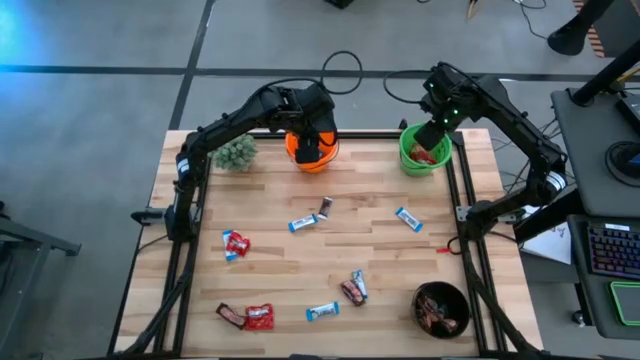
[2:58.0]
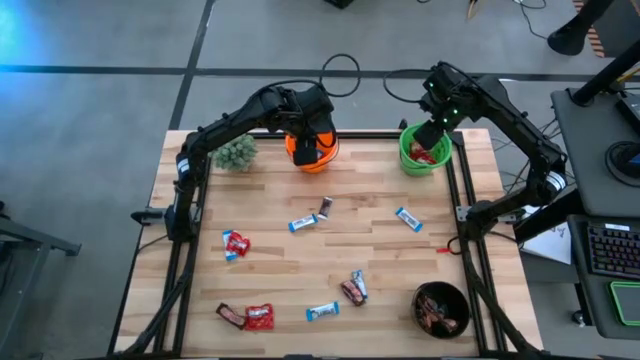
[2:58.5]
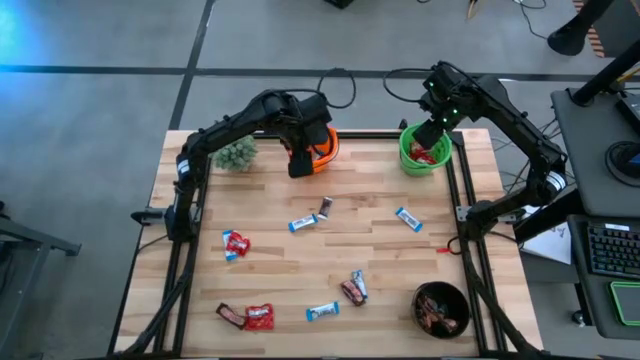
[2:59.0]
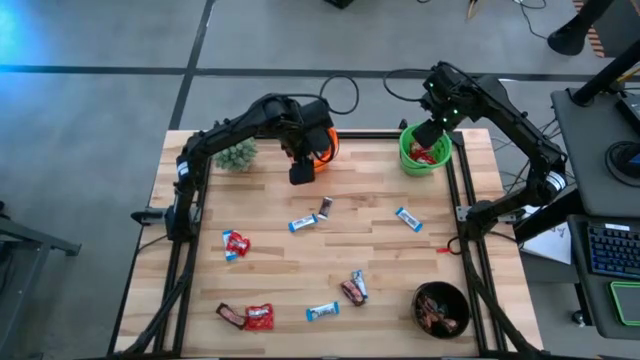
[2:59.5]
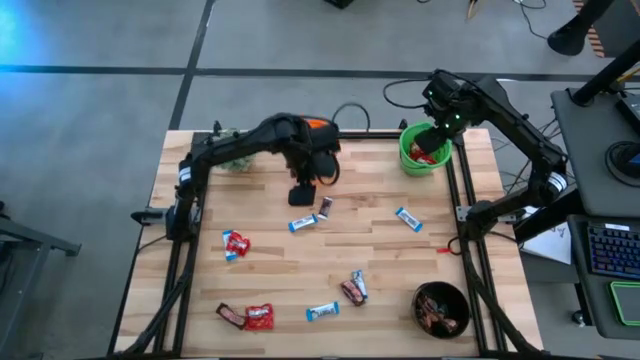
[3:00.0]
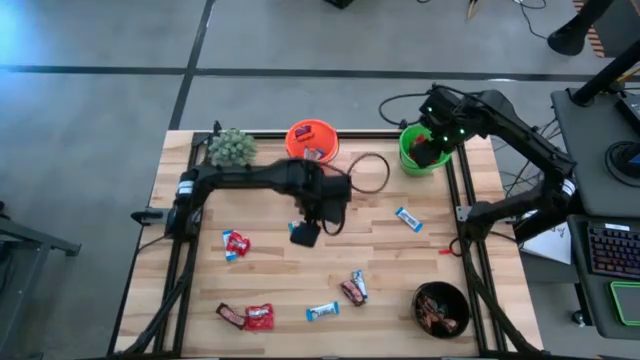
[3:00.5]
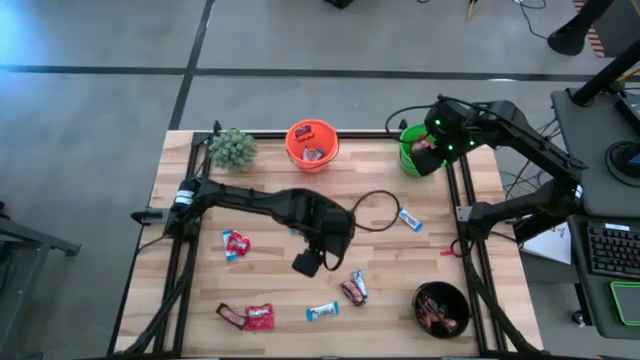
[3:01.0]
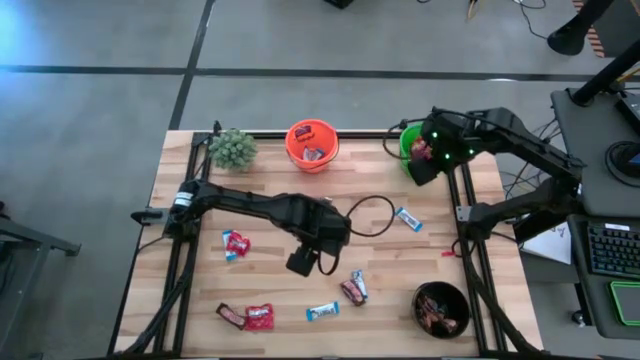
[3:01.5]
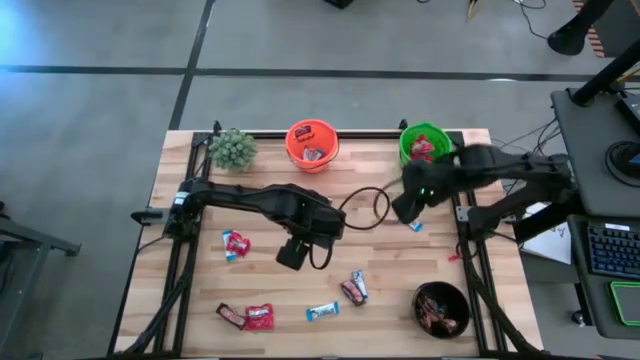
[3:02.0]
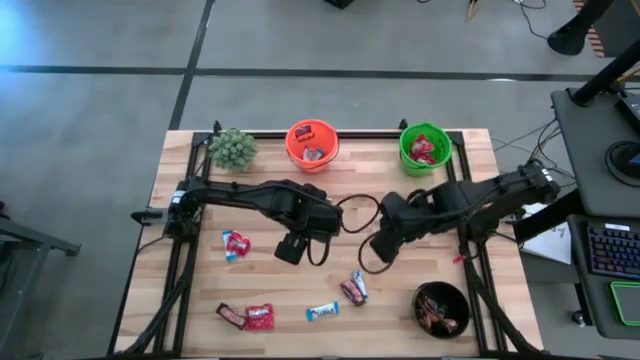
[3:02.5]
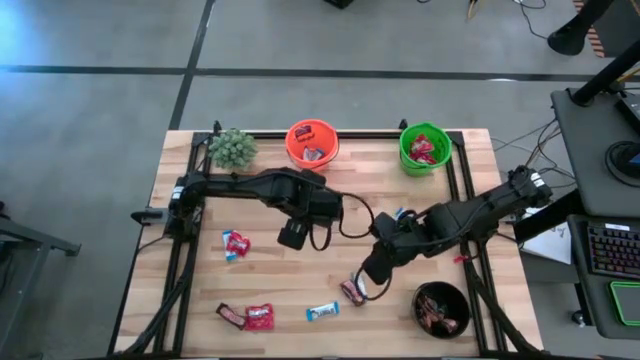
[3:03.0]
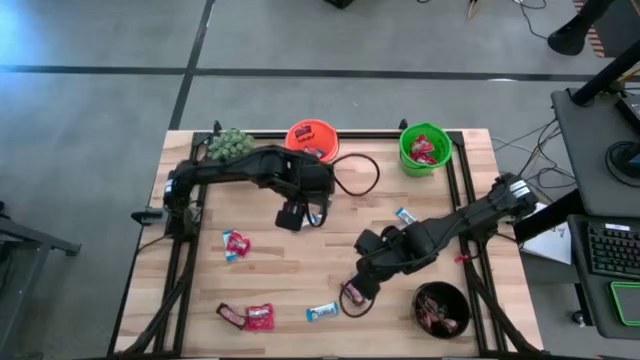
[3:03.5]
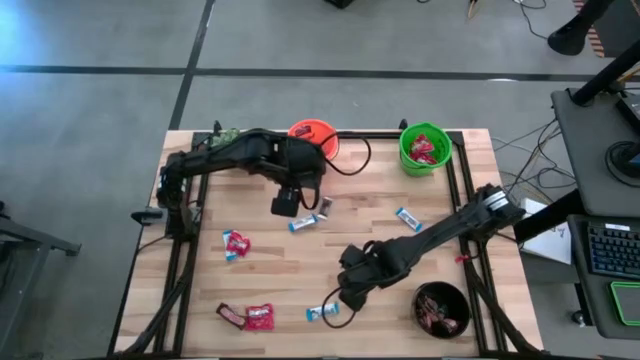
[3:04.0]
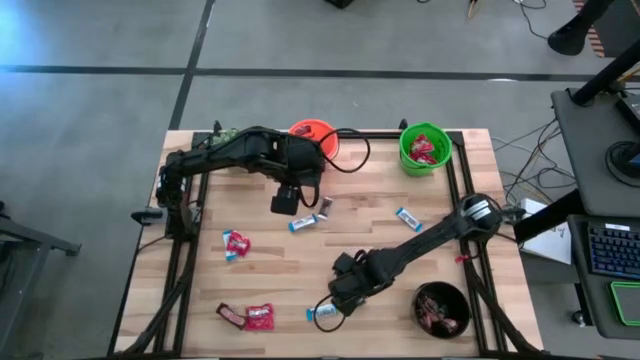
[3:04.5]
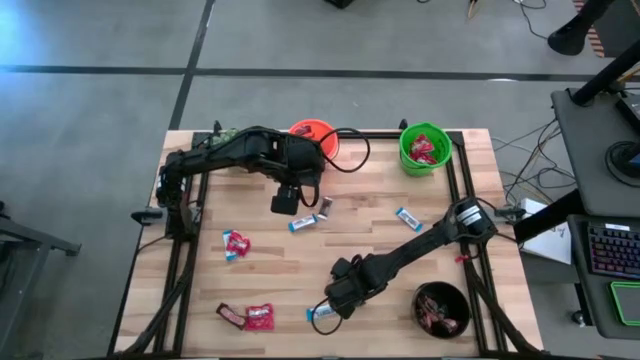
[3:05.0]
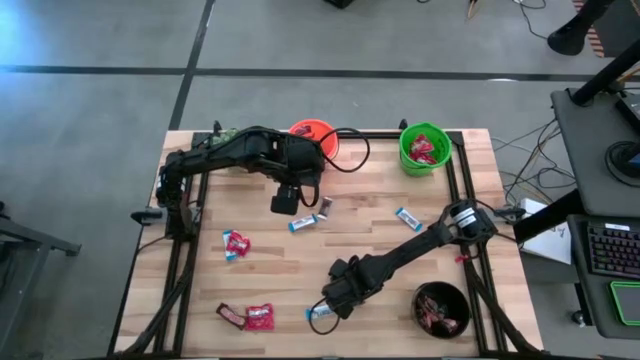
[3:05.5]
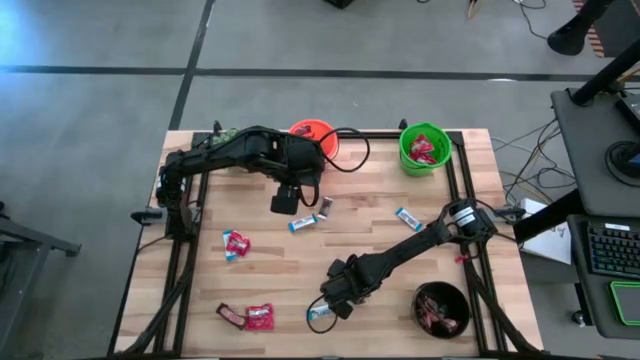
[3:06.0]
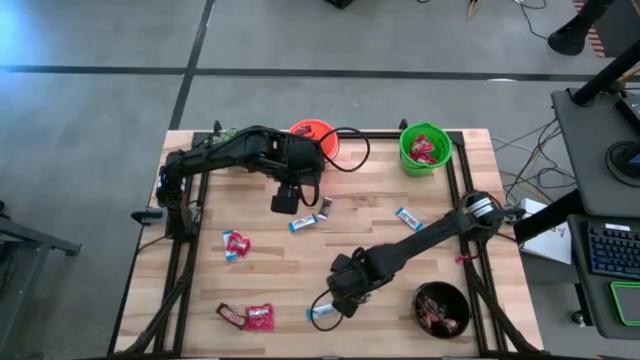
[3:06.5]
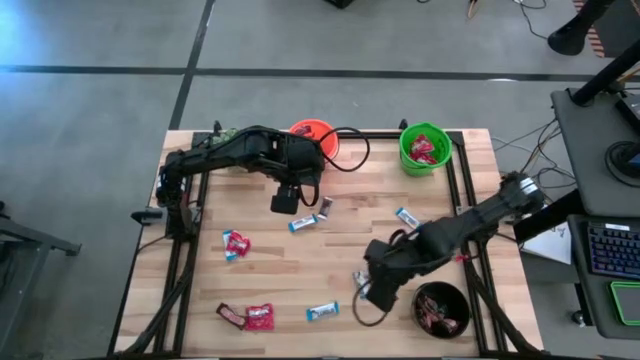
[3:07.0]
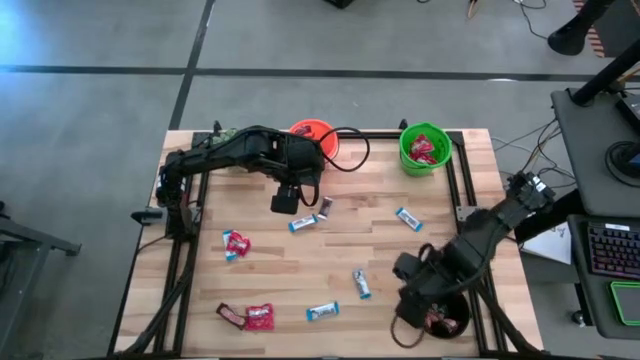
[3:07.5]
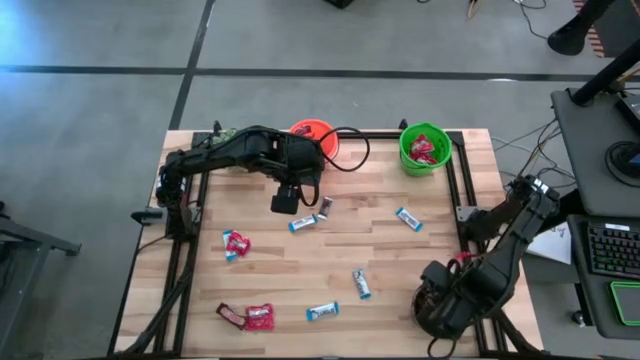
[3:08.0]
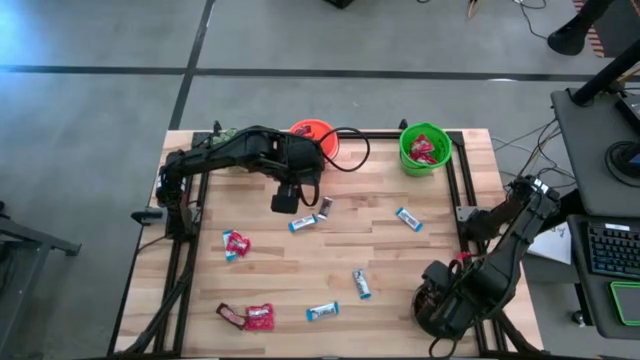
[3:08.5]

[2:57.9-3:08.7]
Task: Sort candy
Put the brown chocolate into the black bucket

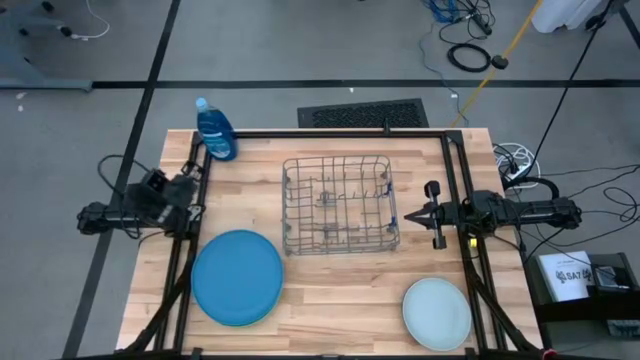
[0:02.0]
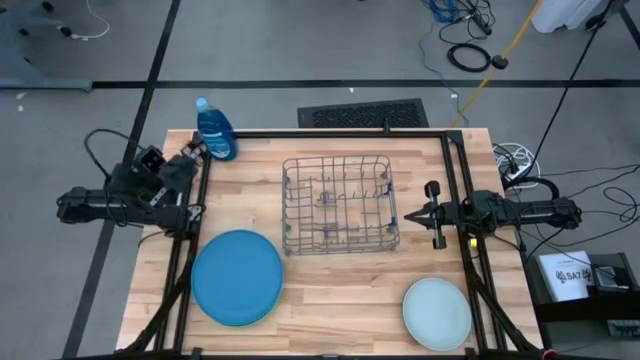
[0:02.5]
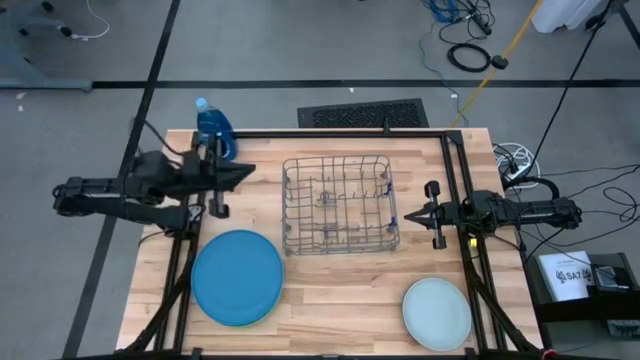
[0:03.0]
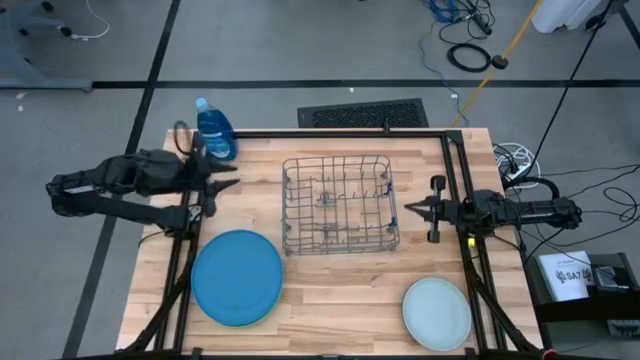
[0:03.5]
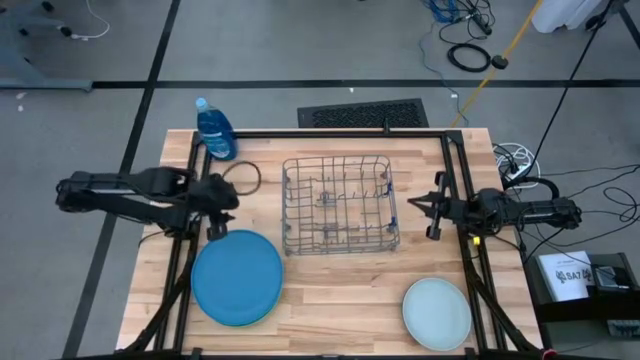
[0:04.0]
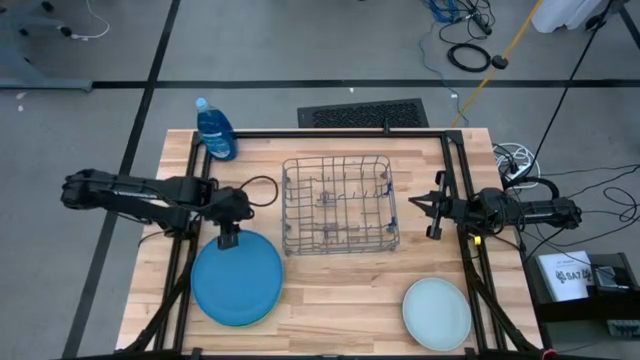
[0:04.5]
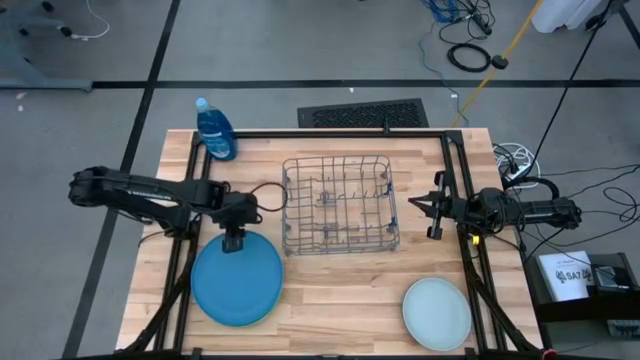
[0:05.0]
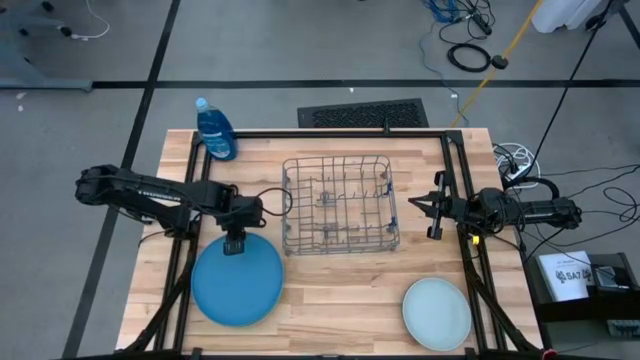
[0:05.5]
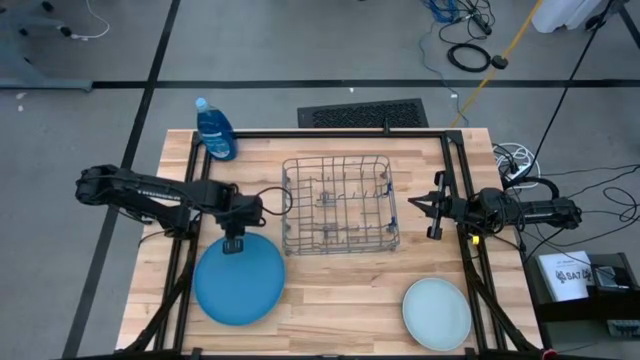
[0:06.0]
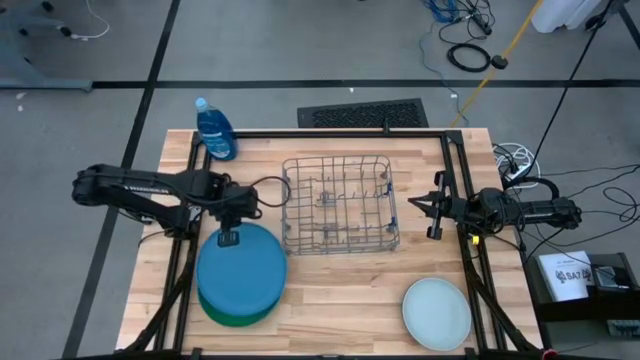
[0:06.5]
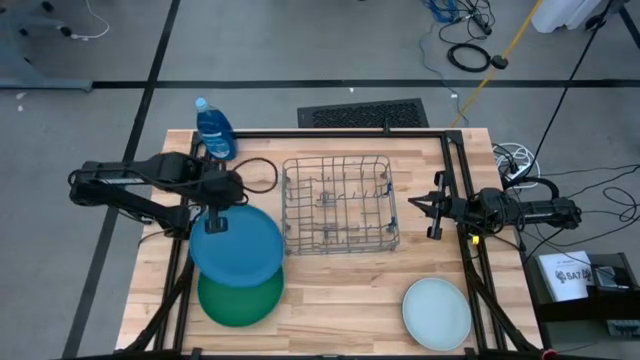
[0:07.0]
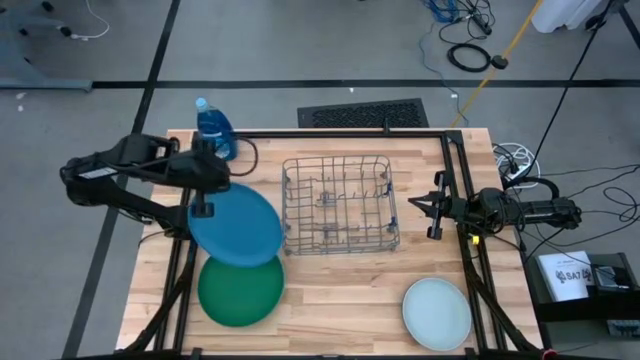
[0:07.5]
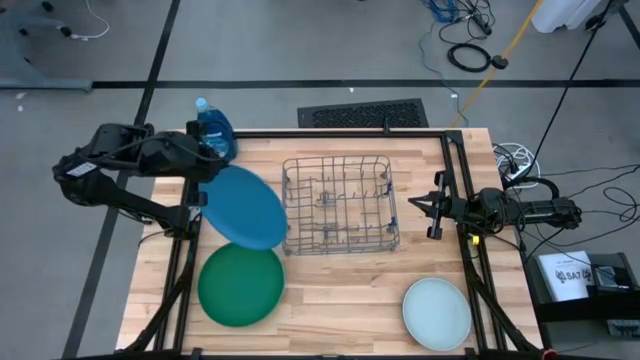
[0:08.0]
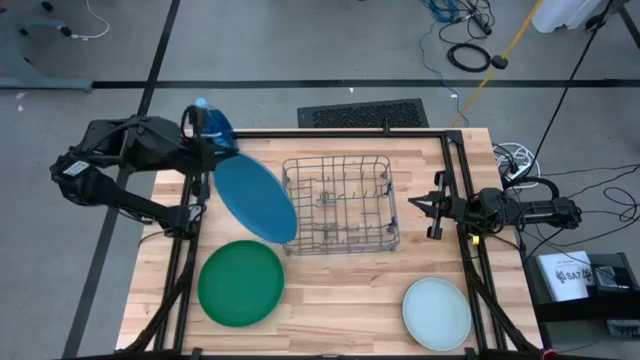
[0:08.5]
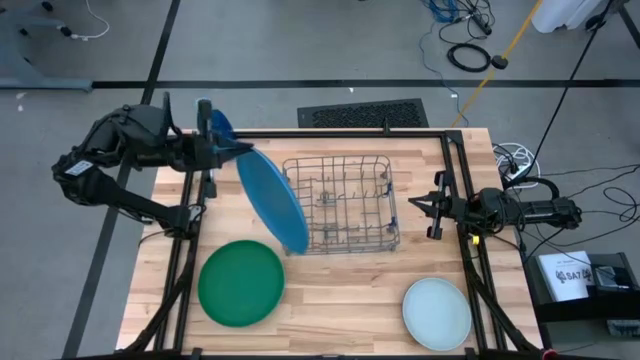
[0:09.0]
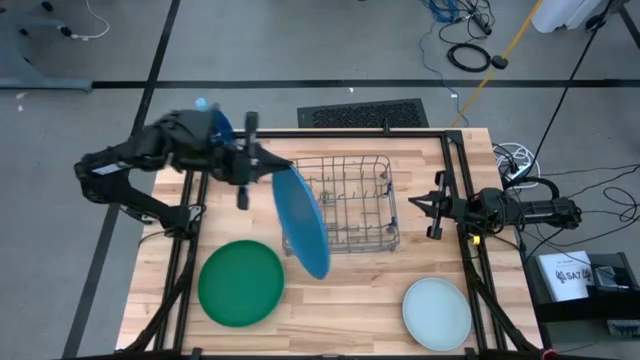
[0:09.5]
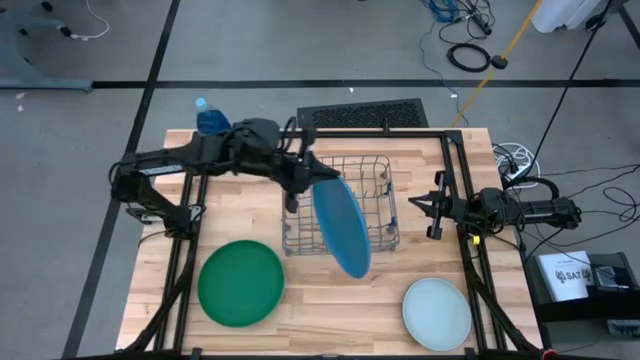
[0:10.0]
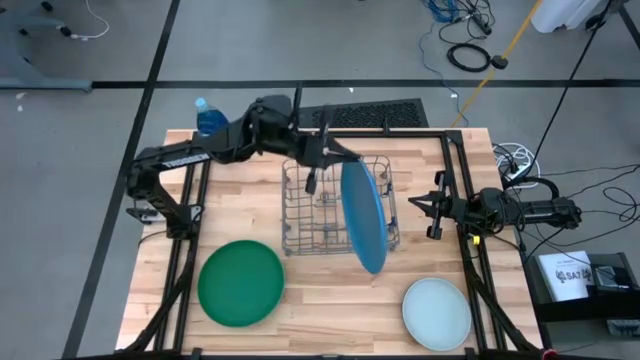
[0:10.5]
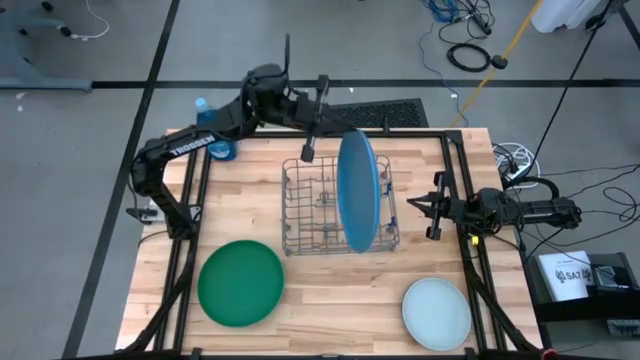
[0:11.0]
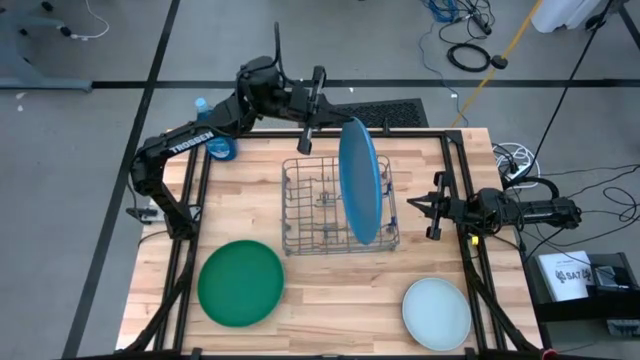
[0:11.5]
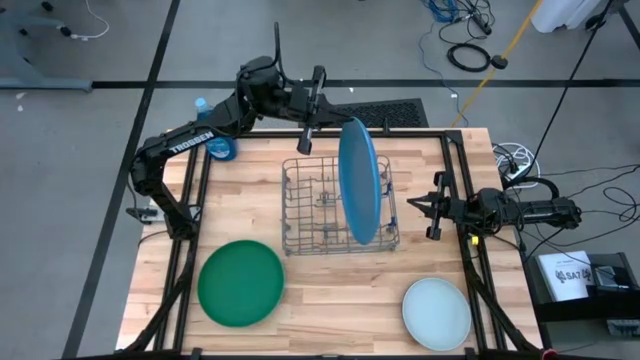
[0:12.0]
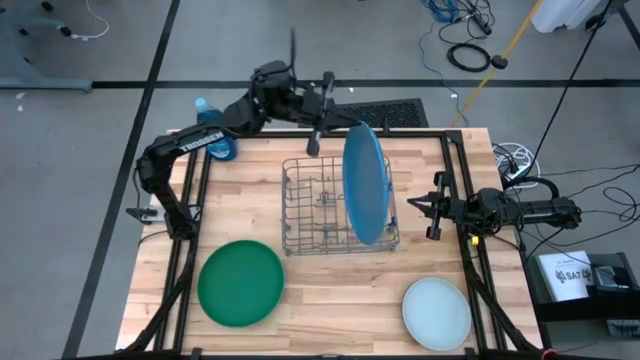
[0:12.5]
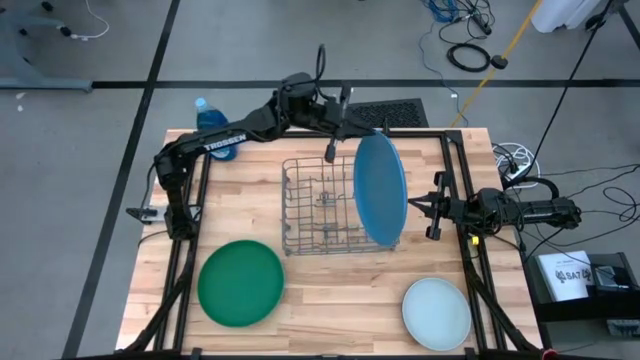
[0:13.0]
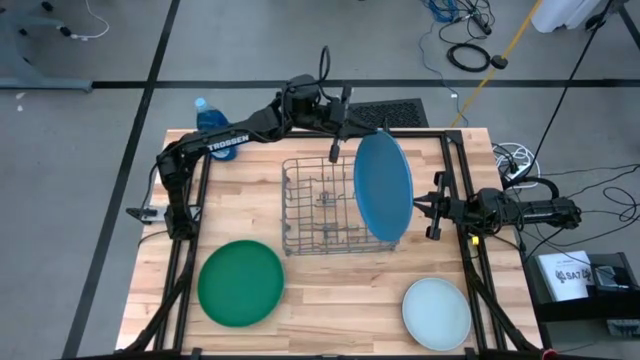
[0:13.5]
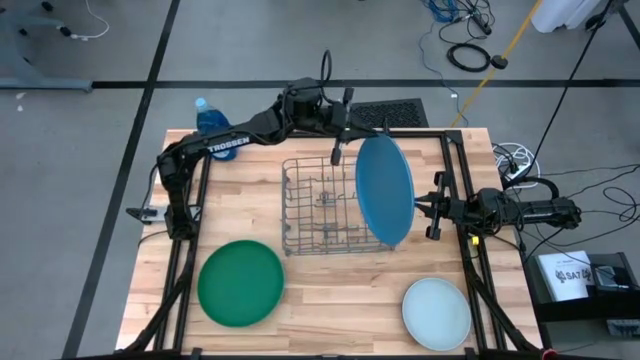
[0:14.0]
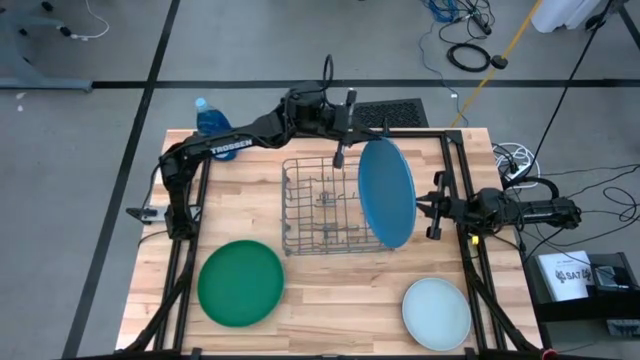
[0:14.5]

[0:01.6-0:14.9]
Task: Sort dishes
Put the blue plate into the dish rack
